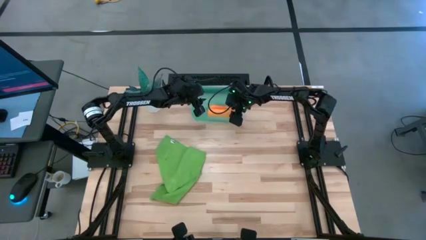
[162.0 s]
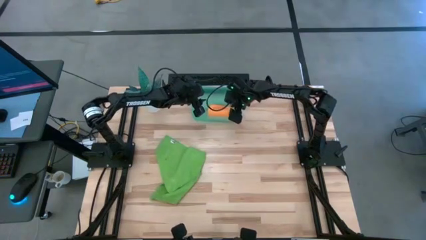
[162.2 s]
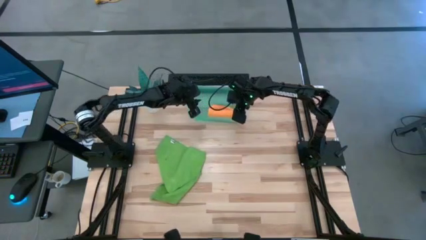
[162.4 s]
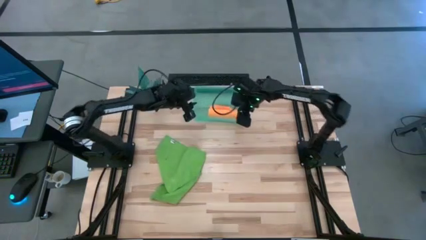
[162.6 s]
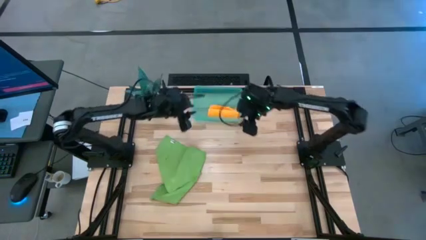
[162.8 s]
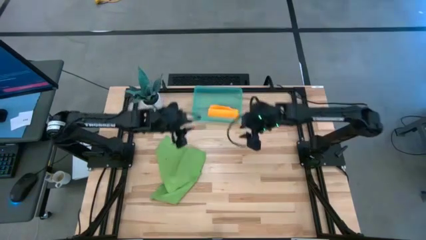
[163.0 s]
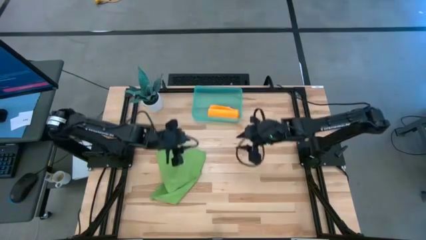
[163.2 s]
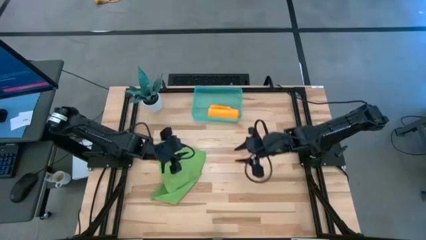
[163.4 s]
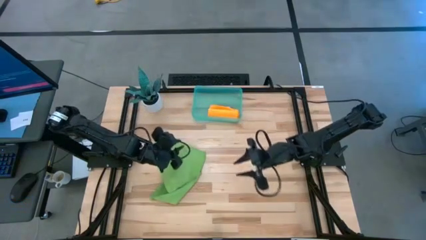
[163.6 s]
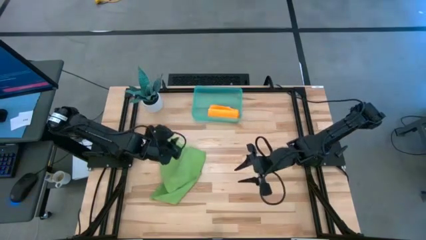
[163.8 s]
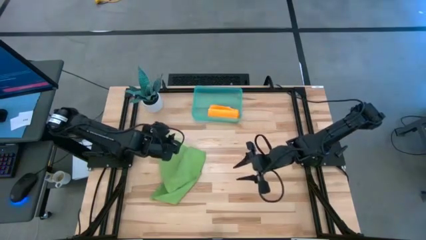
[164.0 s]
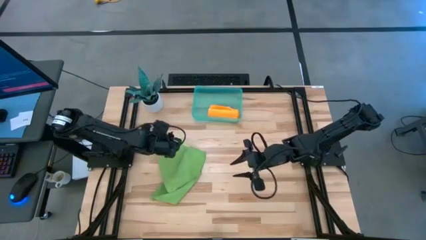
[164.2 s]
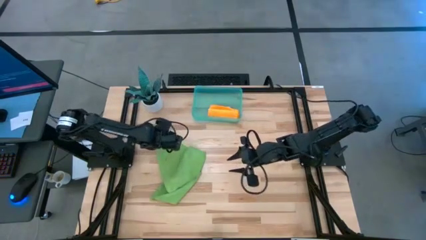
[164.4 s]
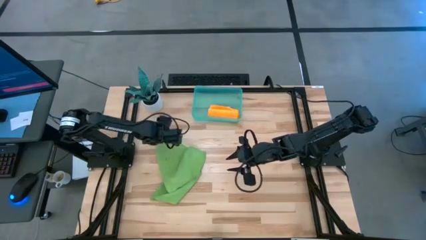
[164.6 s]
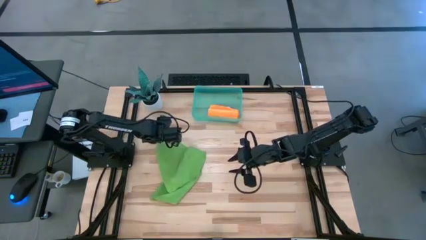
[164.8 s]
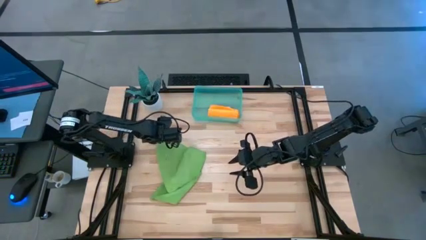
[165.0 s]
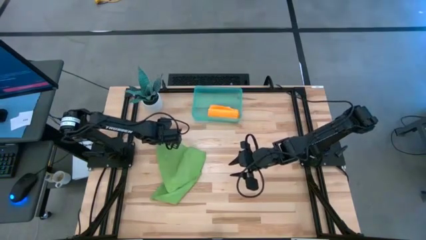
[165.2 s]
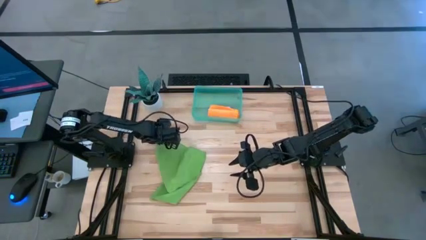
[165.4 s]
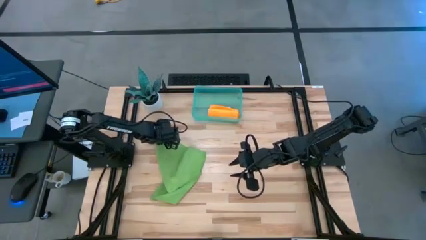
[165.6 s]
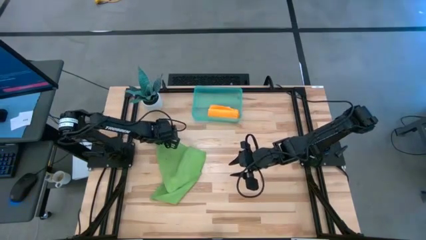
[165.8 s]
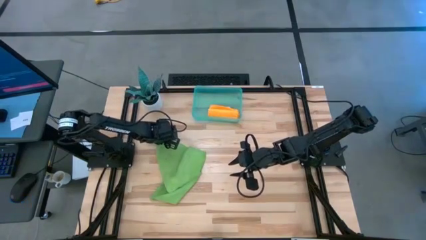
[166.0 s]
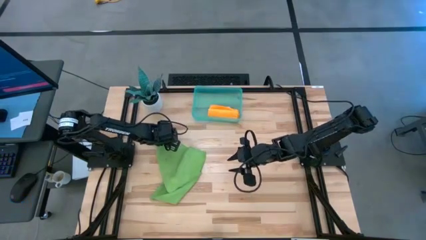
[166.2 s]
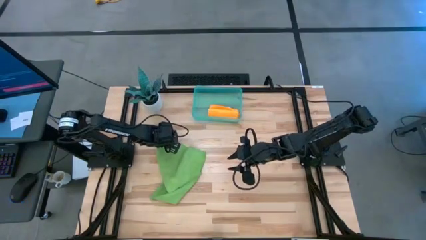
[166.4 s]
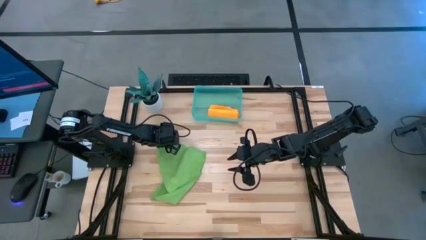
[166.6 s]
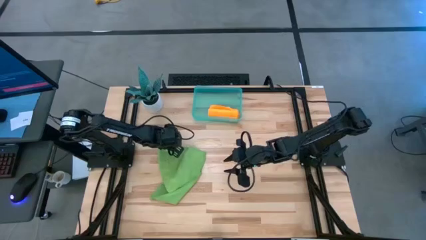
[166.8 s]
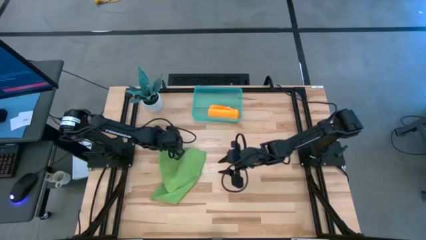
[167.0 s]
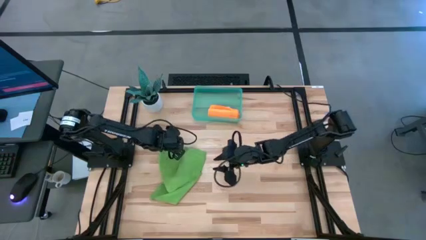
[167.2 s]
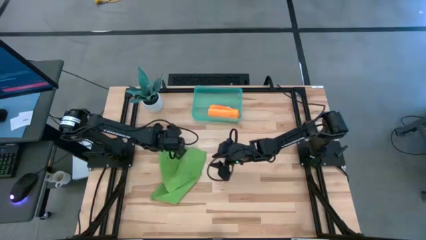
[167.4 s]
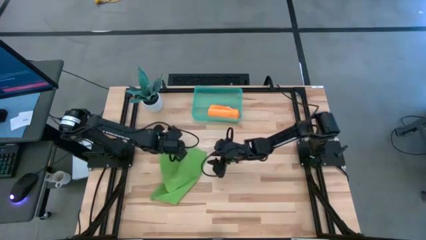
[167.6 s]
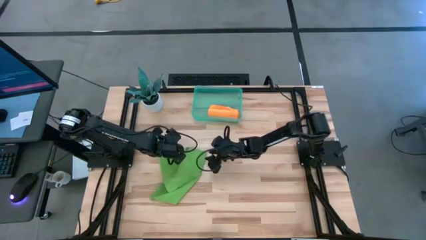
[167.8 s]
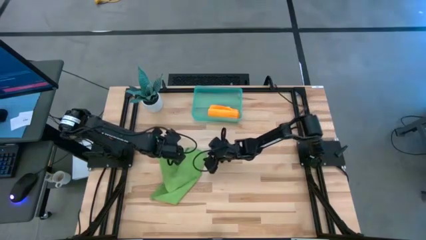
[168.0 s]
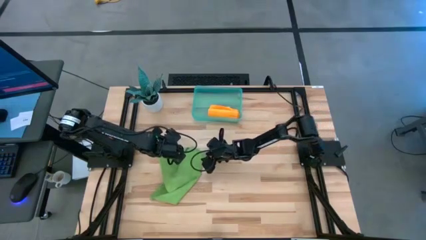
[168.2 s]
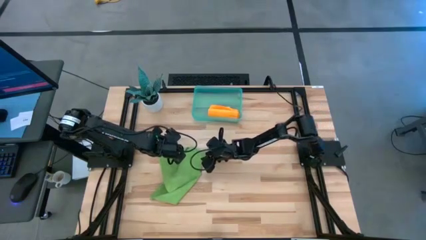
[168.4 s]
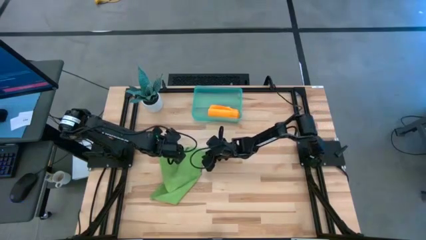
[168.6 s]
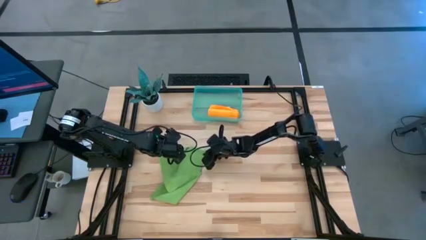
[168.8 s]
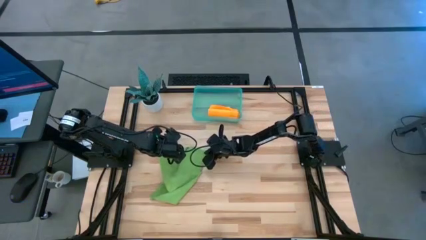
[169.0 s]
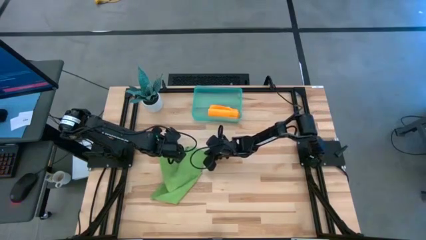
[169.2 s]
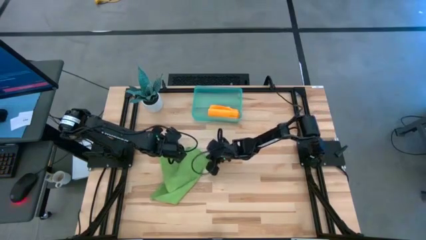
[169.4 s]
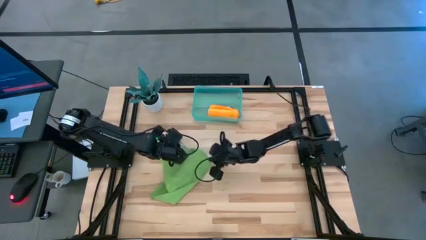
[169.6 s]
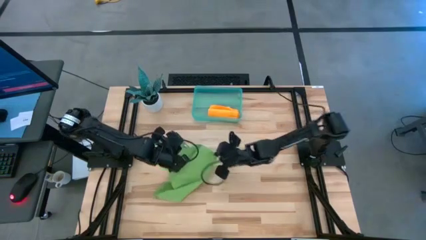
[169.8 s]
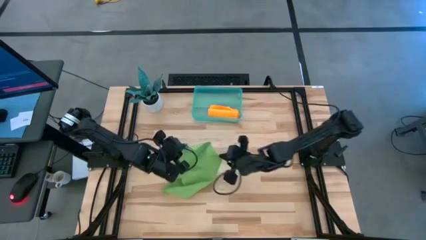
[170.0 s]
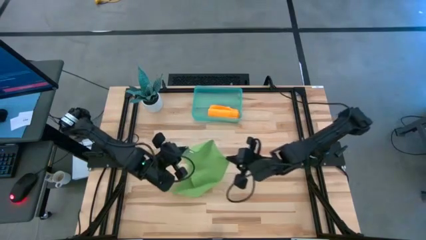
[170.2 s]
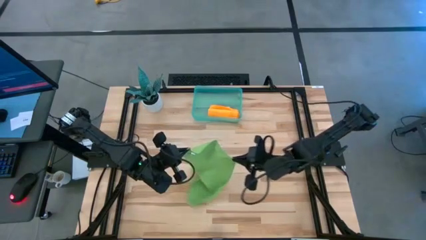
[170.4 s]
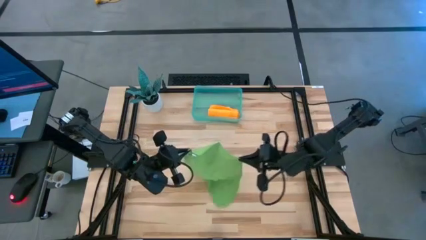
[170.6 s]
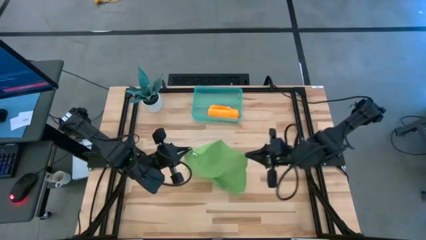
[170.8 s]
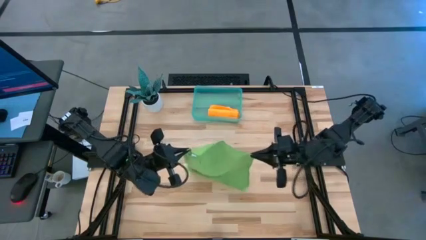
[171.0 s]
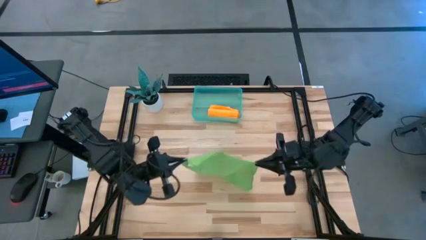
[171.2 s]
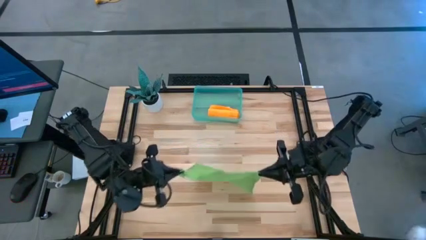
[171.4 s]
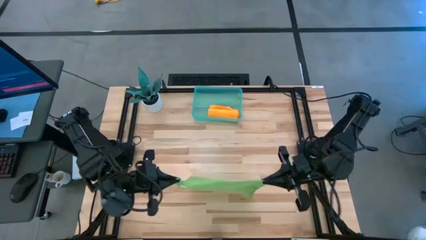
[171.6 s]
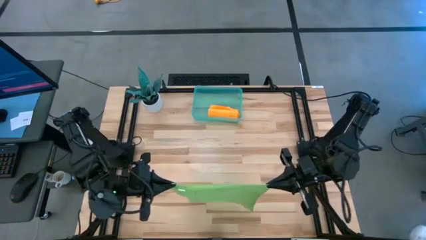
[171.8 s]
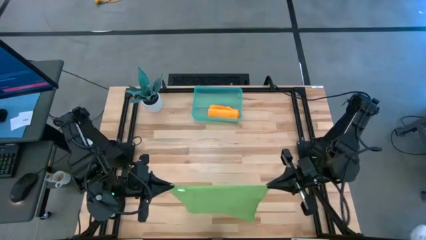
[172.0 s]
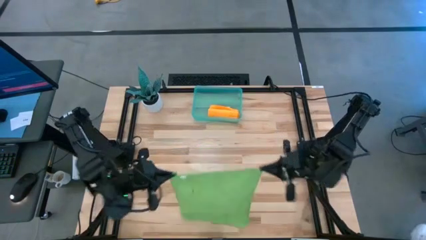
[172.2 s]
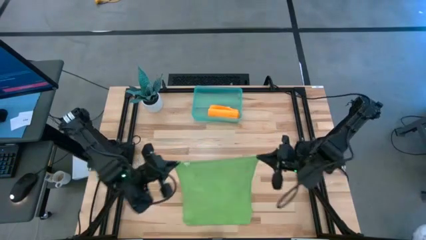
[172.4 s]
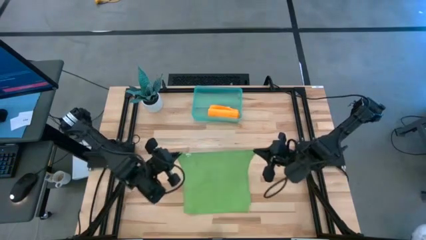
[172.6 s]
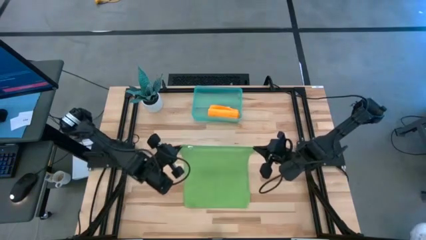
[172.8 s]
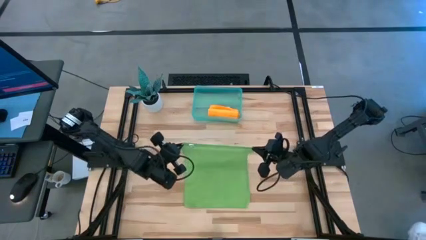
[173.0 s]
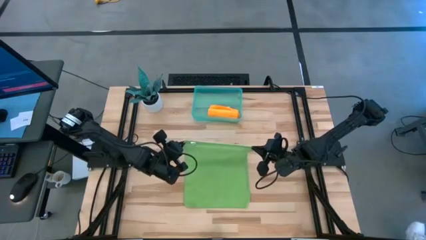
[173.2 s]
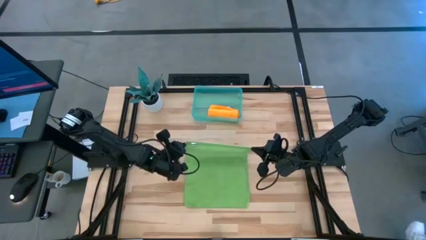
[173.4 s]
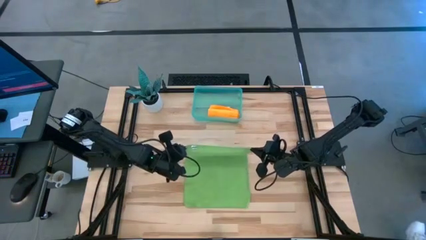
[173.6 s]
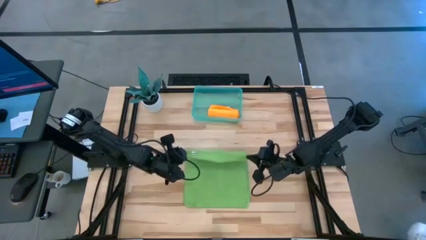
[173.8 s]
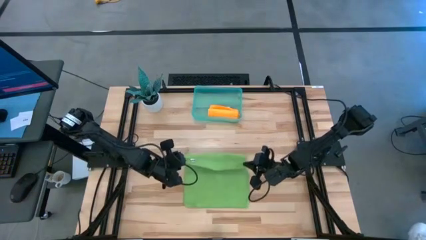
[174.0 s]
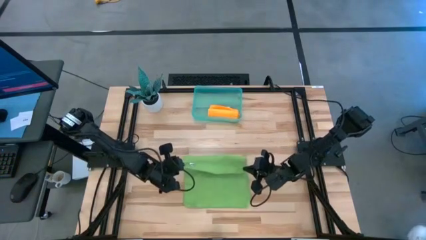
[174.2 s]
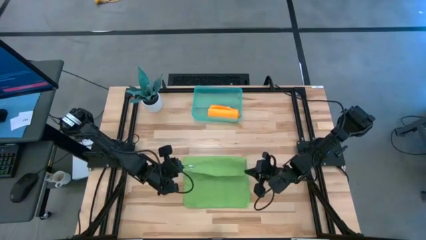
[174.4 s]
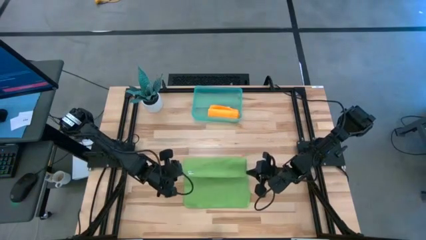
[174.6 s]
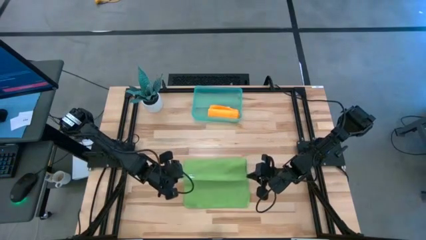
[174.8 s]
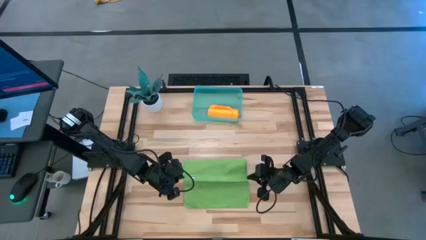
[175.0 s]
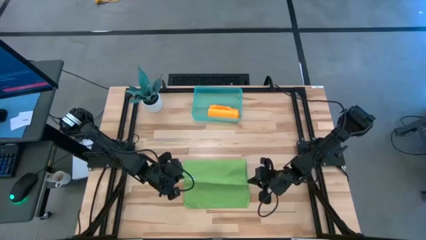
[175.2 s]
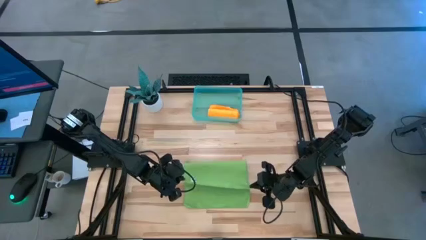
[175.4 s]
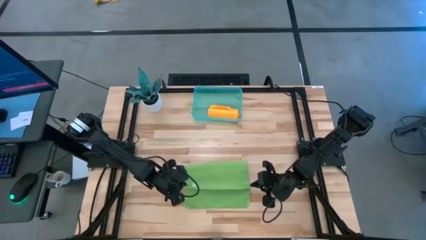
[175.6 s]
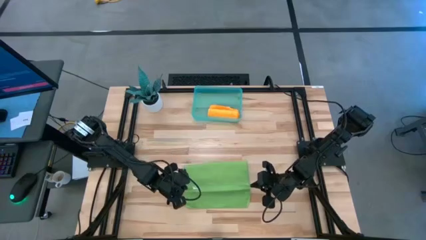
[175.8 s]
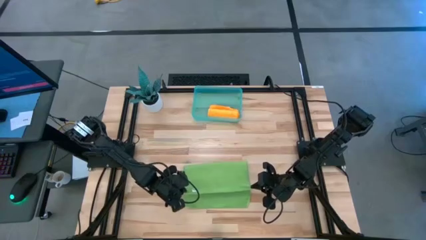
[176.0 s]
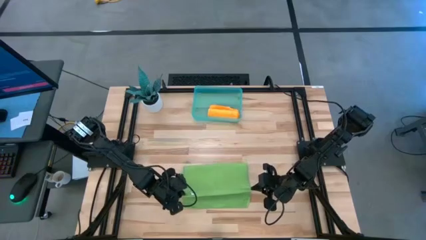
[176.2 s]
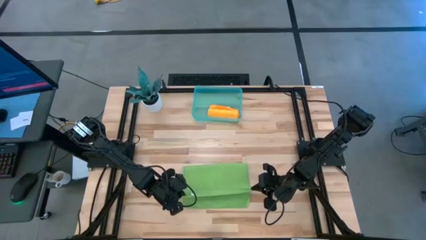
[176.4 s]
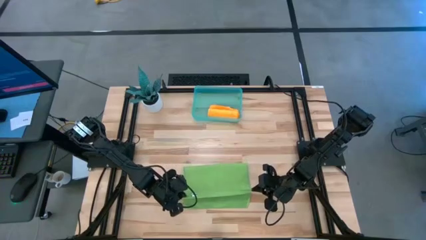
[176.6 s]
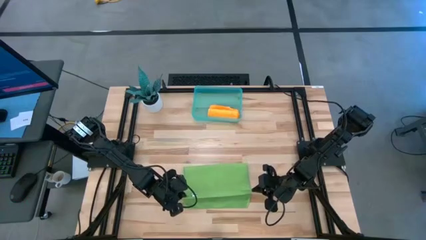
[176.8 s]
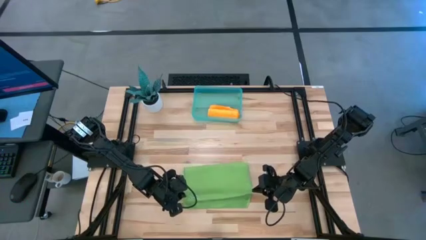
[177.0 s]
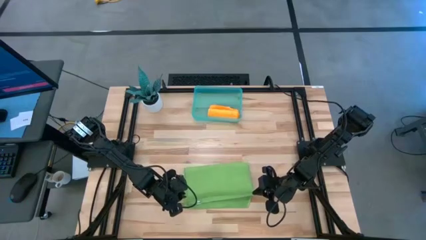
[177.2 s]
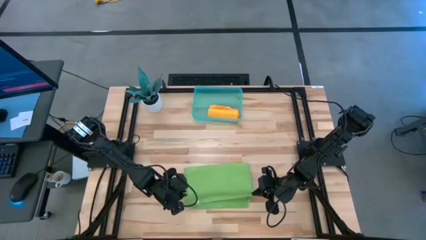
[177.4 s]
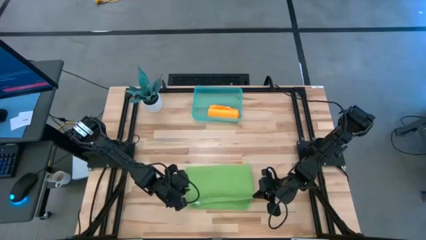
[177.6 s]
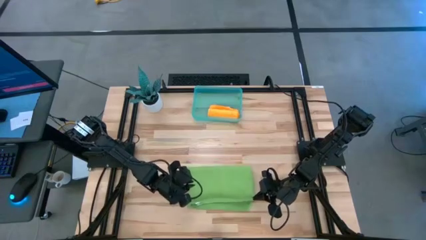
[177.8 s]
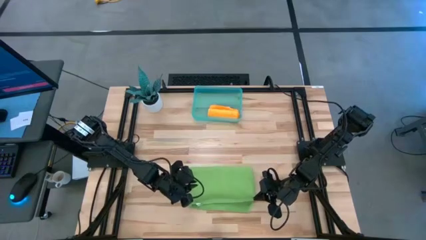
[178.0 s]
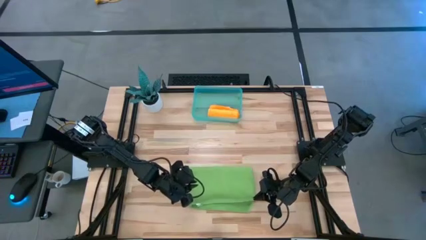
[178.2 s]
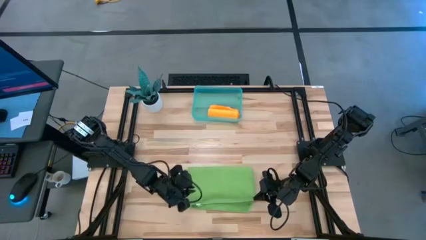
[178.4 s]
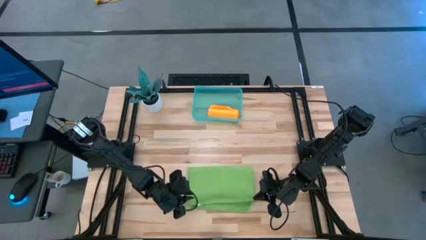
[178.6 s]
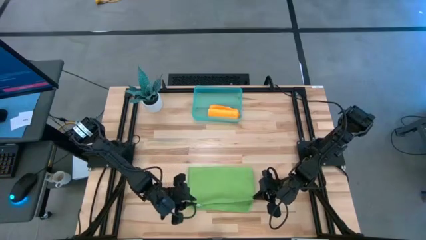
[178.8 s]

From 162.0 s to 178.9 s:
Task: Roll microfiber towels into tight, uniform cylinder then place into a basket
Roll the green microfiber cloth
